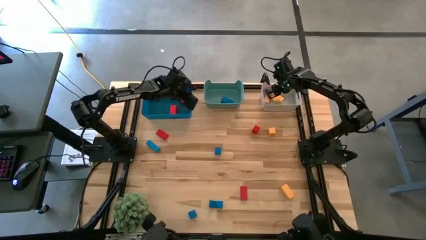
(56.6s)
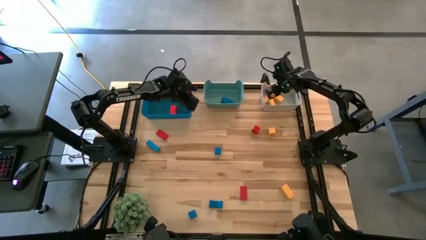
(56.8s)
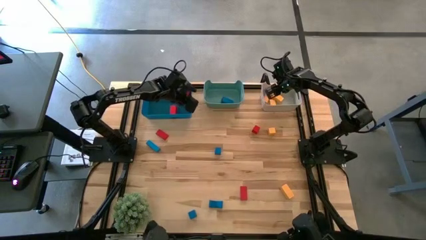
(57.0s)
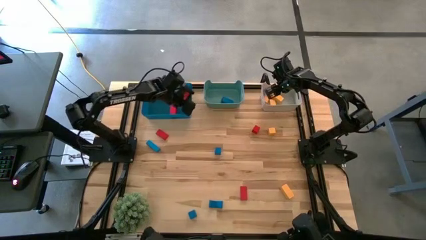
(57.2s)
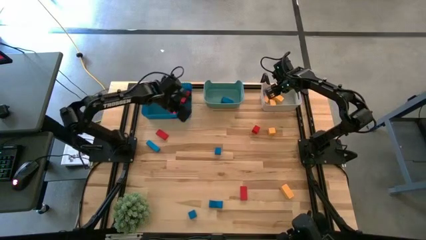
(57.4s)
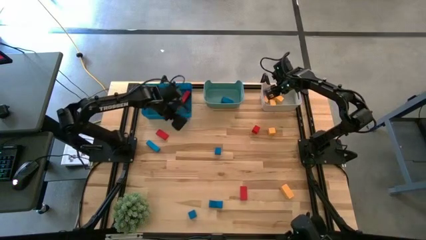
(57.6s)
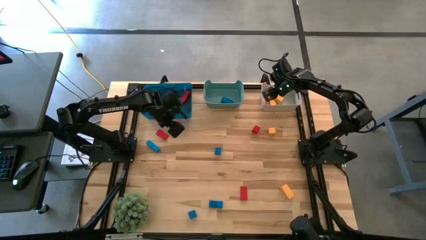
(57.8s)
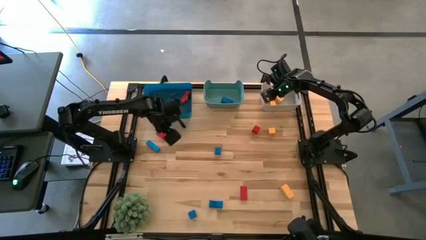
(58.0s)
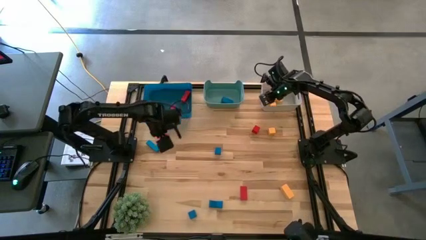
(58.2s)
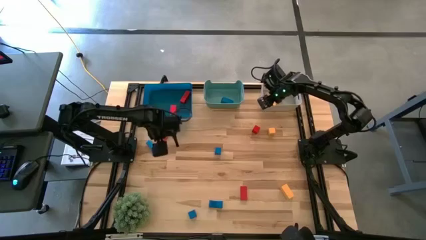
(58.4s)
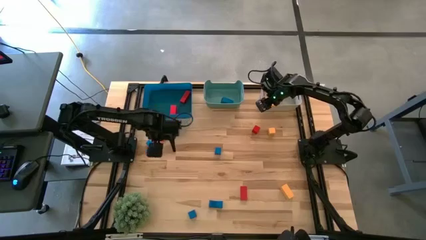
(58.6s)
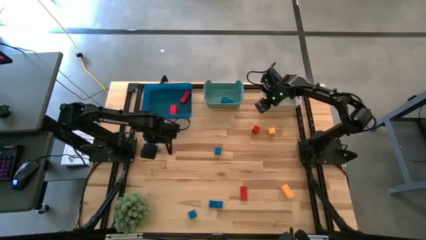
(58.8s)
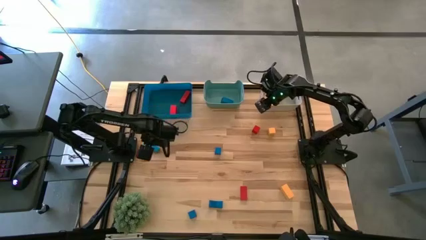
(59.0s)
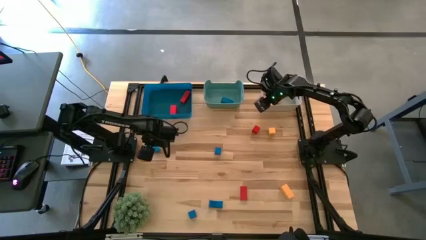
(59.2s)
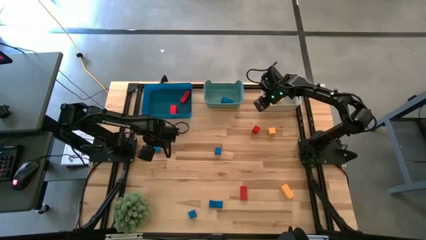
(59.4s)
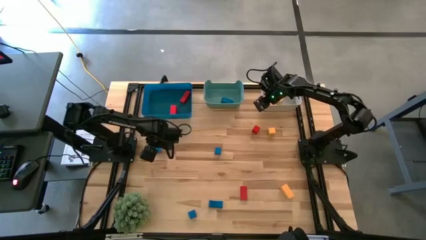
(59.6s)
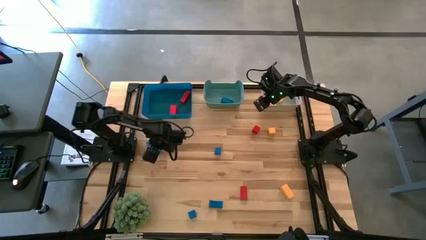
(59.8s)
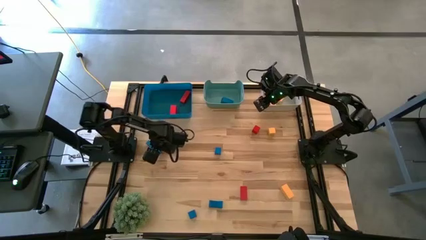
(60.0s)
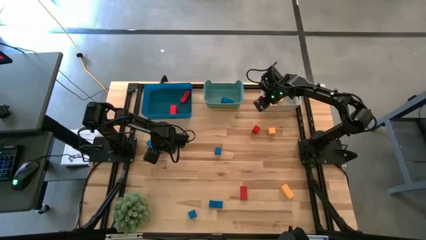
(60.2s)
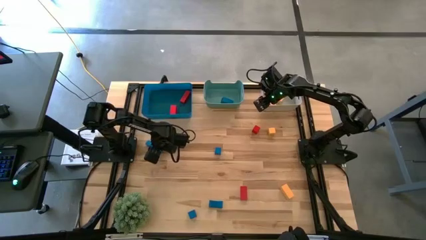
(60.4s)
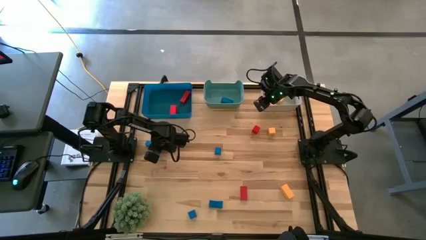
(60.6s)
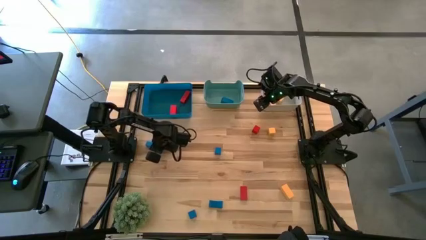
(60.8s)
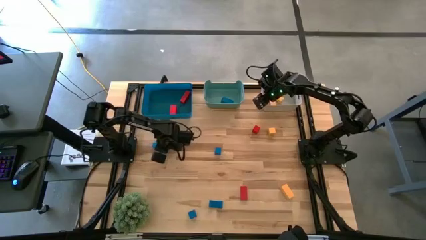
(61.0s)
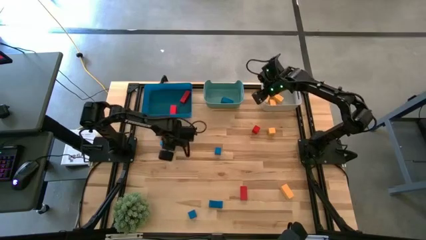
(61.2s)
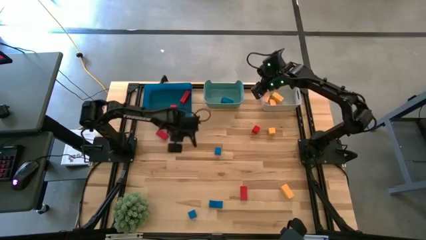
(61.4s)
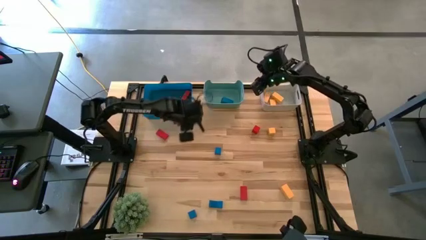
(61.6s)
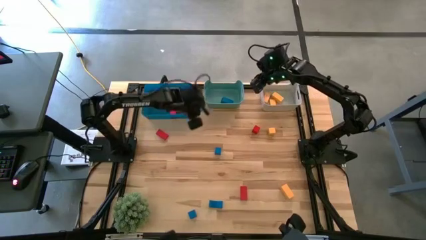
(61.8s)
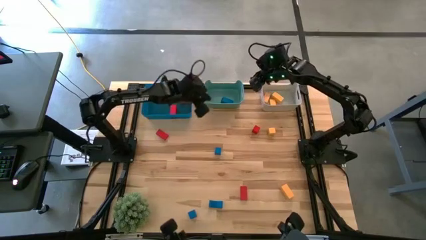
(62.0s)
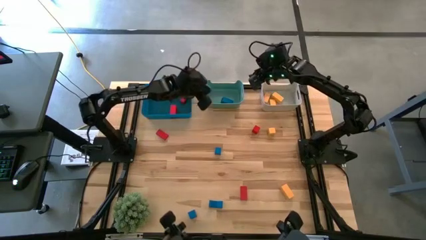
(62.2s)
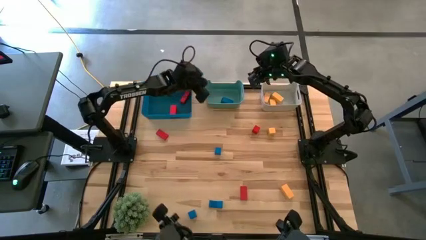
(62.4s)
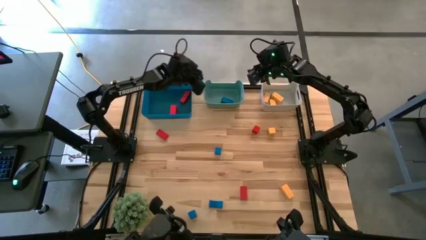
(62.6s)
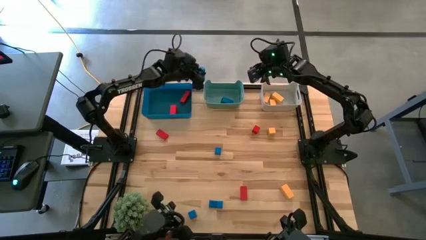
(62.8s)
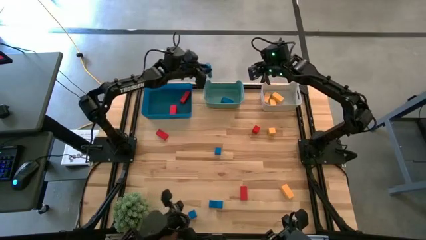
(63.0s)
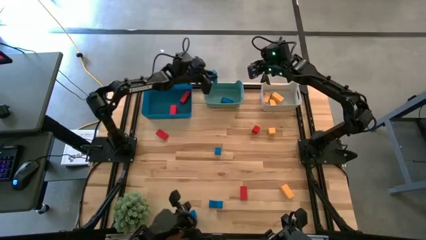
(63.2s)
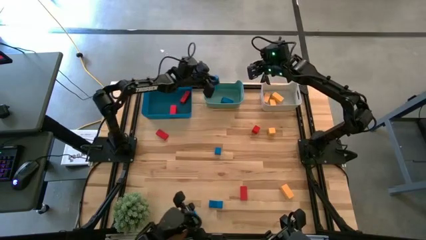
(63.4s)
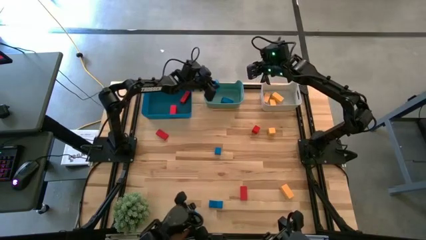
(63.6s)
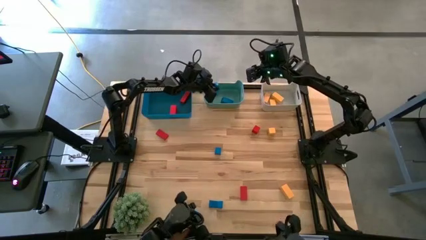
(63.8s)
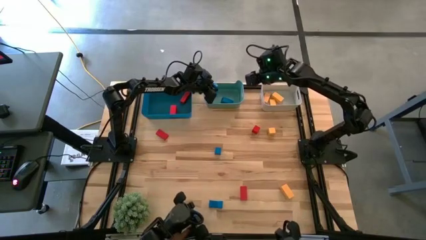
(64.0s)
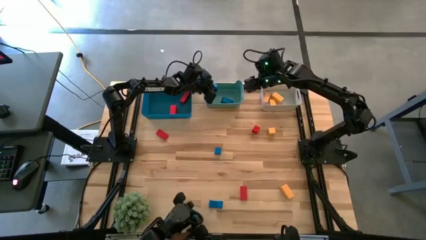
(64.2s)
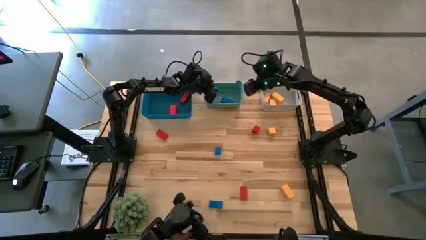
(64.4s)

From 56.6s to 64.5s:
Task: Sort & place blocks by color
Put the blue block into the green bin

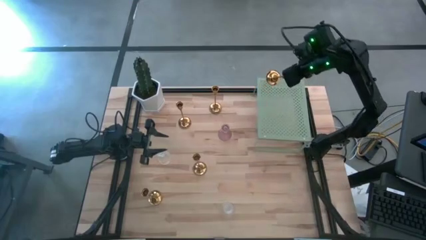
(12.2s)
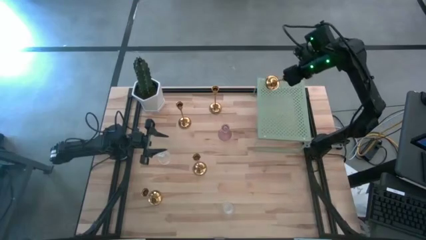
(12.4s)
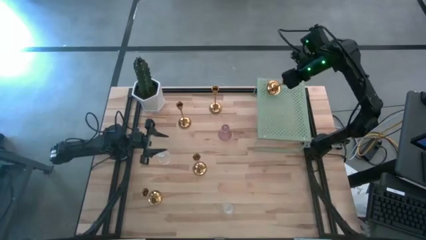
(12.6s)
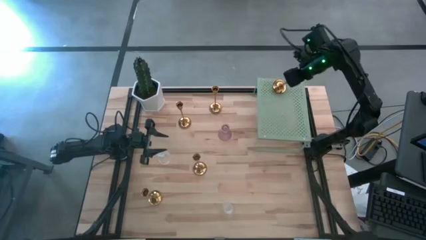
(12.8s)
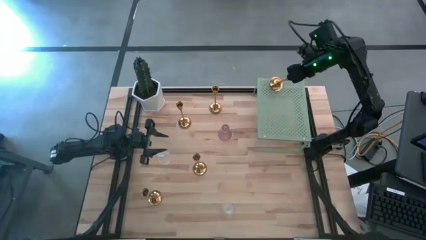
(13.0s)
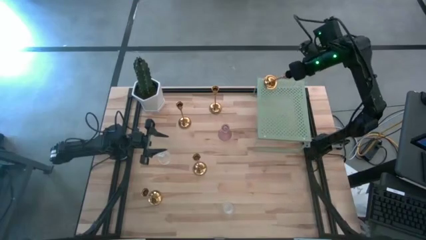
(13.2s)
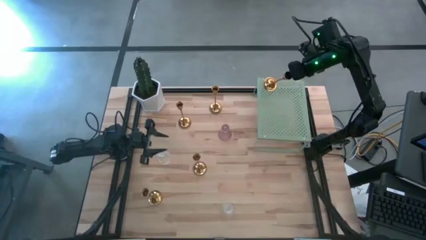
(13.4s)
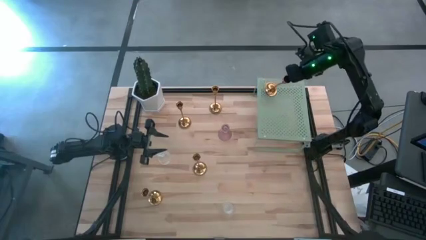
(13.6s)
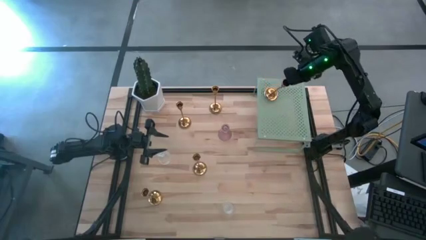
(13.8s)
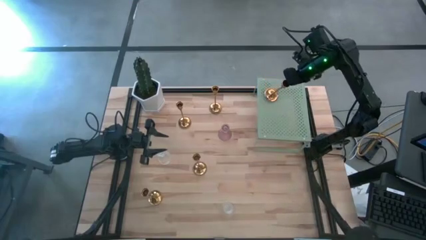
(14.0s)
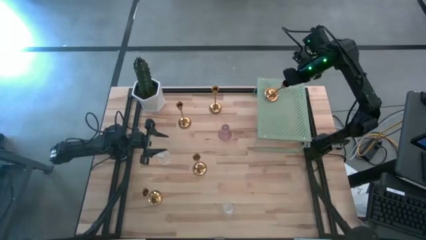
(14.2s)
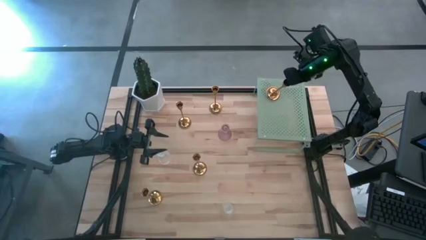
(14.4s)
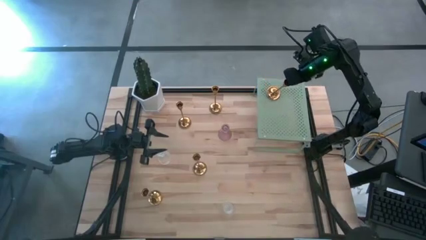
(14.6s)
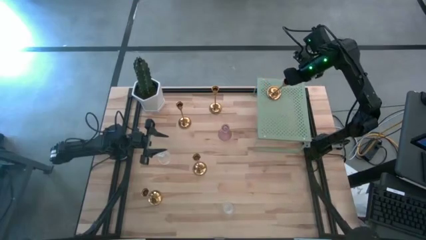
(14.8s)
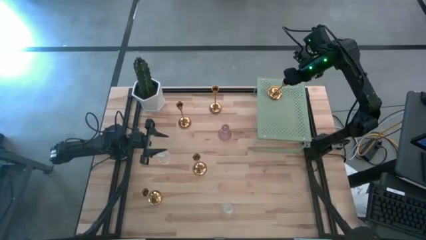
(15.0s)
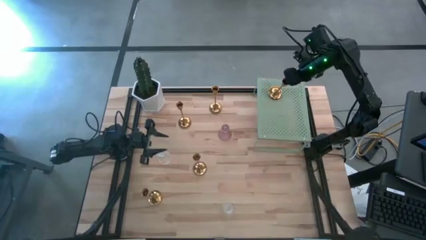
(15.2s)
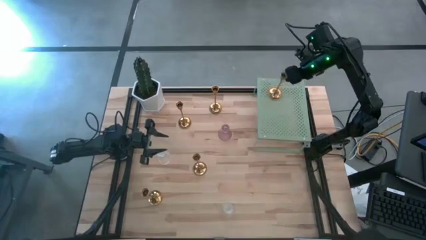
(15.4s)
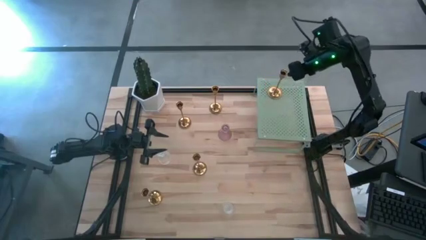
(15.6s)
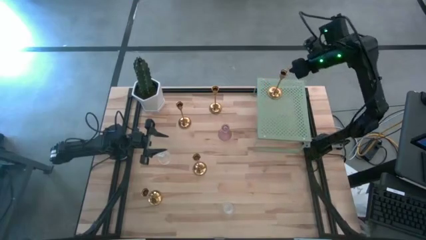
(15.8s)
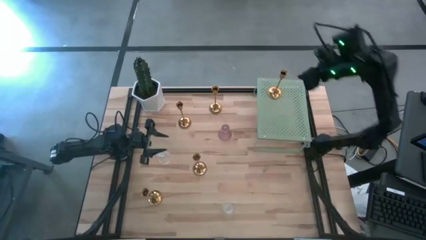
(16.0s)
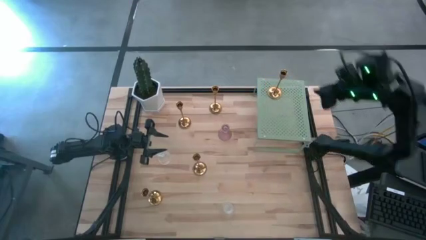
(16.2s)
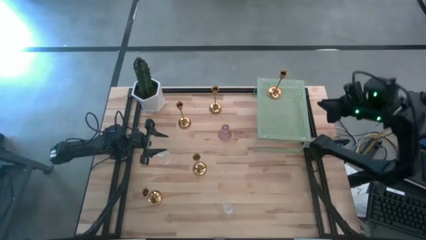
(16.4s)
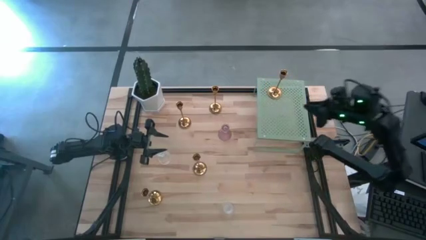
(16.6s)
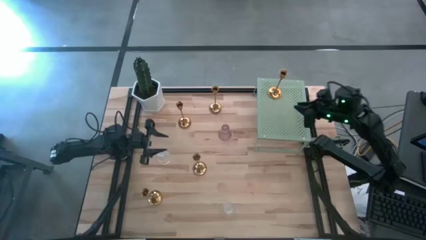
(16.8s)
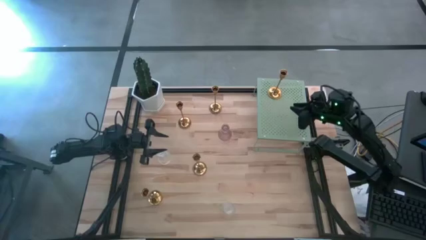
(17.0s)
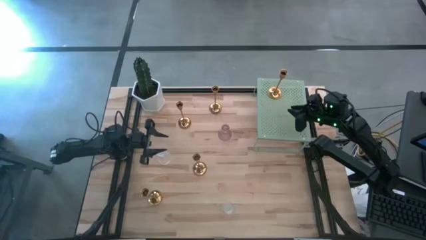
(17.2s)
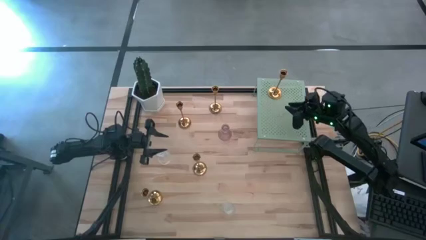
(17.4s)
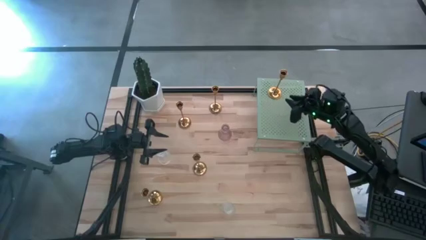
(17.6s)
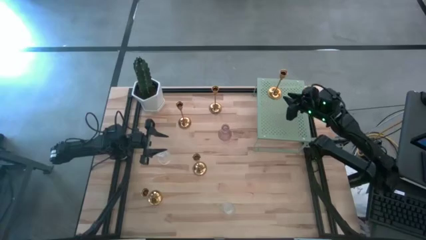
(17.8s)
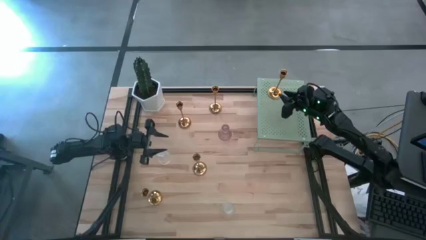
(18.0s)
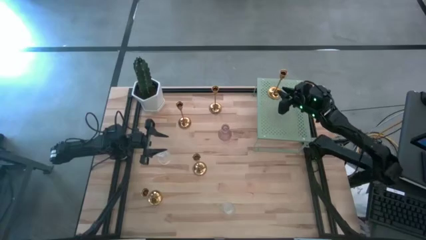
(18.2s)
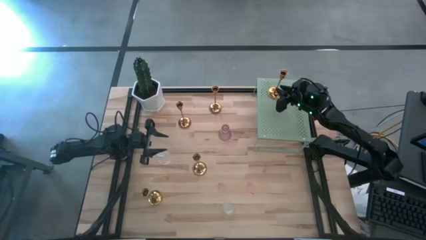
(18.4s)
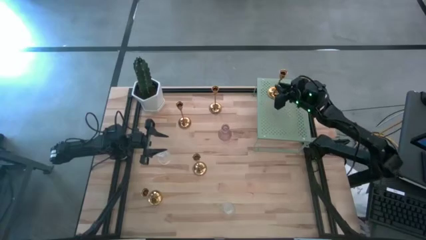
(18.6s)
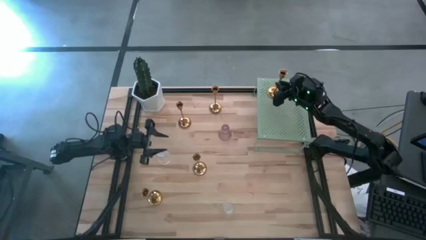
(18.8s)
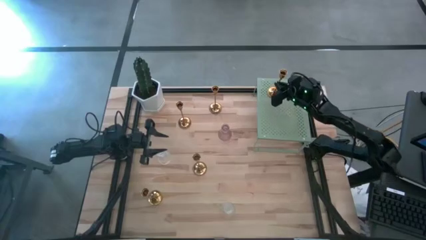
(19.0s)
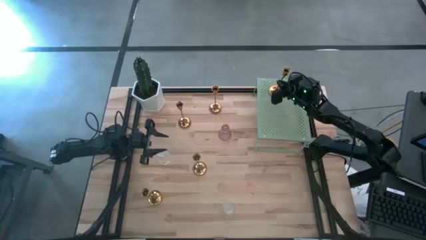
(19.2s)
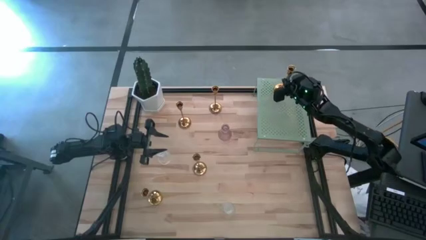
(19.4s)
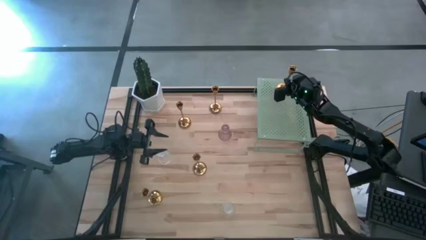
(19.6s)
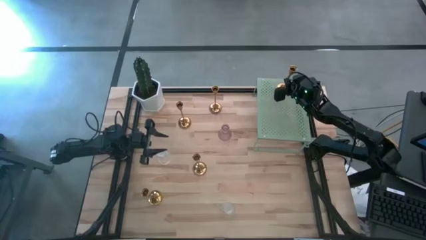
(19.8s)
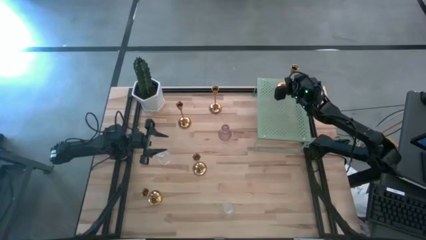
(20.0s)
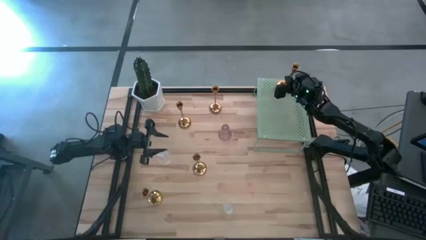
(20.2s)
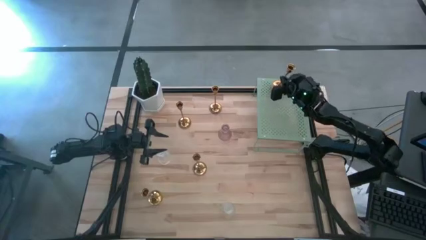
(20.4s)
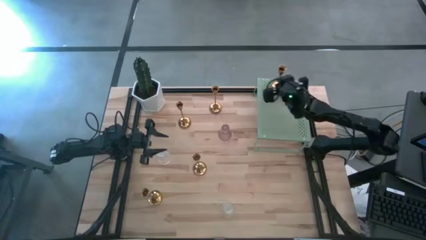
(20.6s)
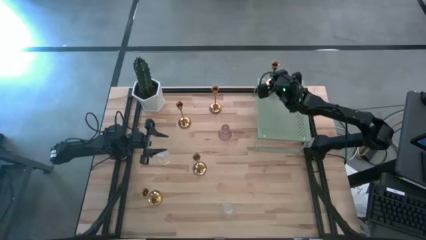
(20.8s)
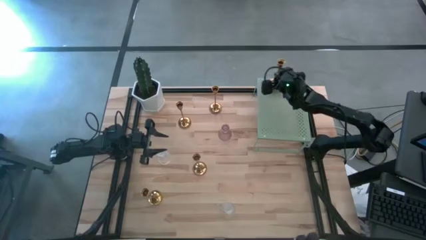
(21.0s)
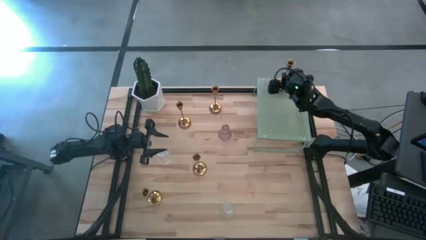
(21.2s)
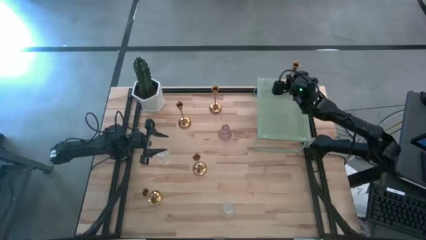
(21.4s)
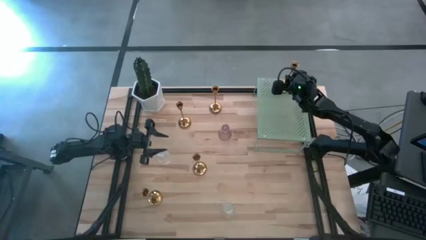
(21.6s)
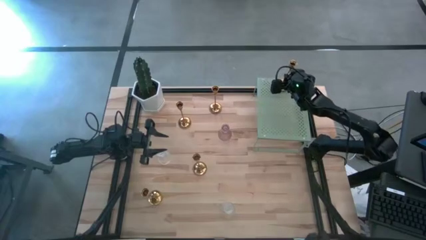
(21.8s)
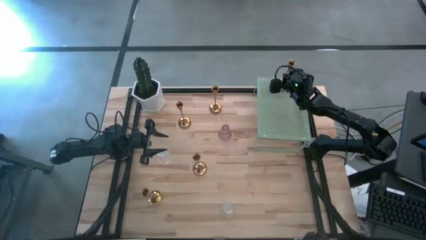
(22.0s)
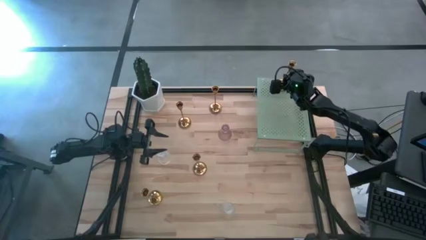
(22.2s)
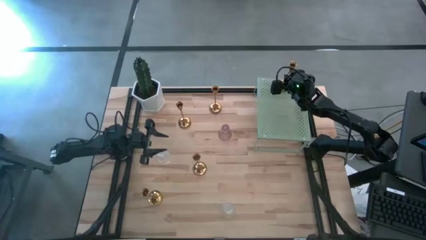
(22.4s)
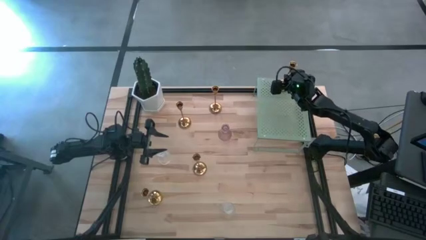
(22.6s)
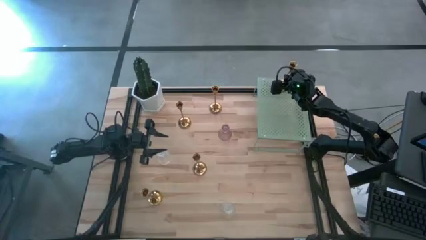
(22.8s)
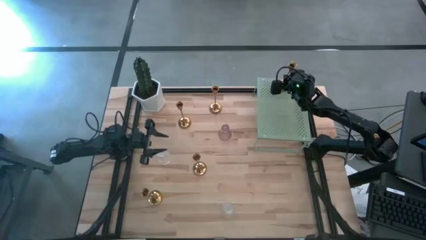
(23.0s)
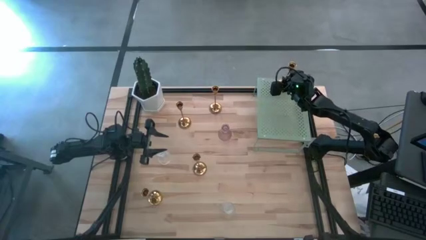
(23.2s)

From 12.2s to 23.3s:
Task: Pick & Place candle stick holders
Put the gold candle holder on the shelf
